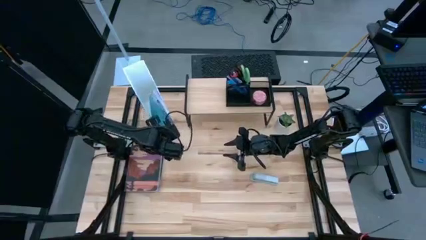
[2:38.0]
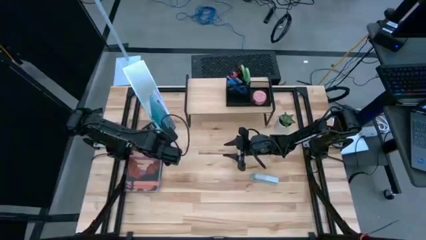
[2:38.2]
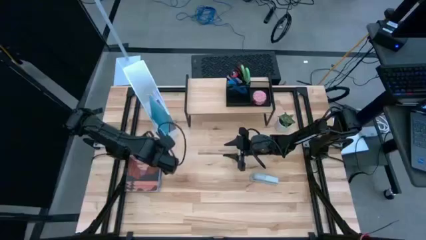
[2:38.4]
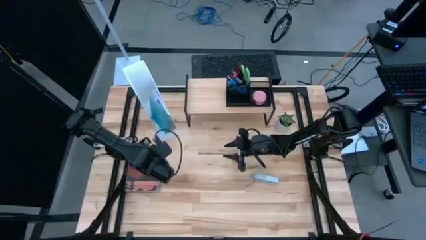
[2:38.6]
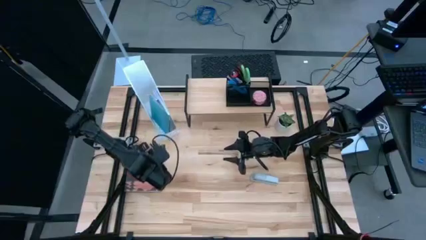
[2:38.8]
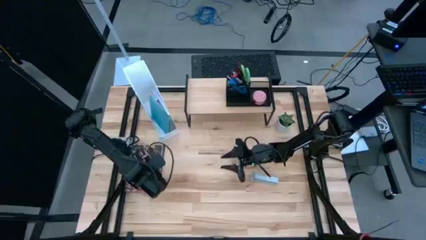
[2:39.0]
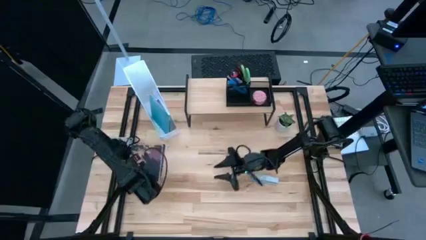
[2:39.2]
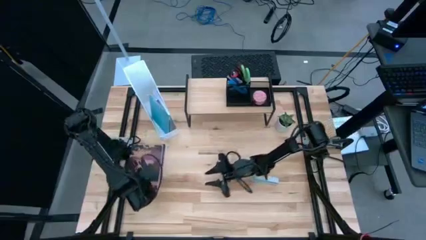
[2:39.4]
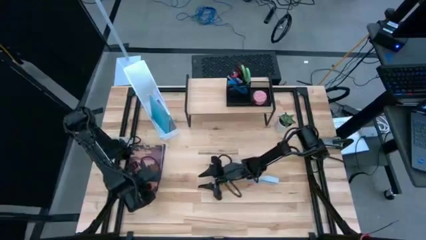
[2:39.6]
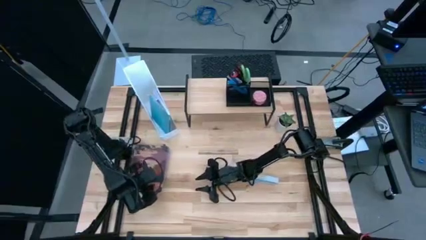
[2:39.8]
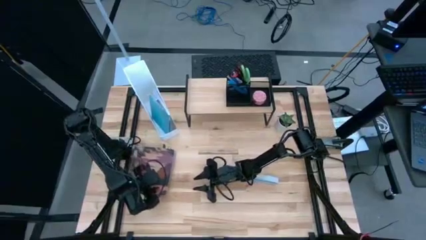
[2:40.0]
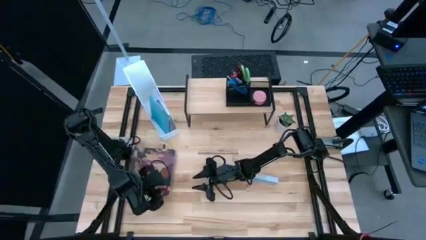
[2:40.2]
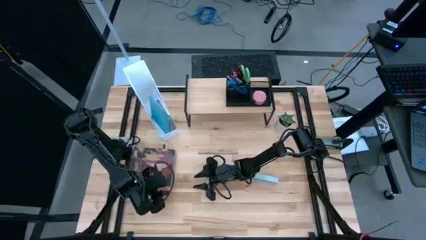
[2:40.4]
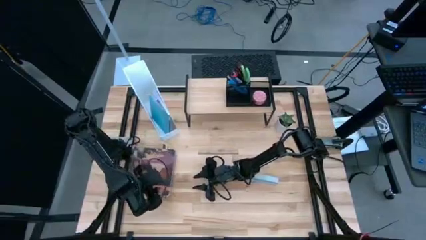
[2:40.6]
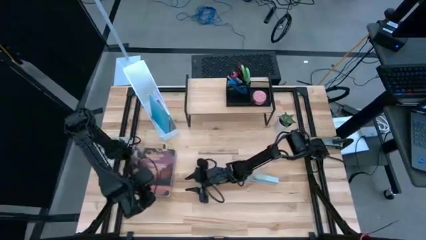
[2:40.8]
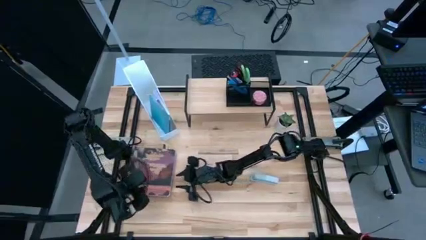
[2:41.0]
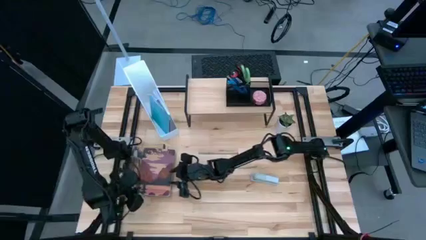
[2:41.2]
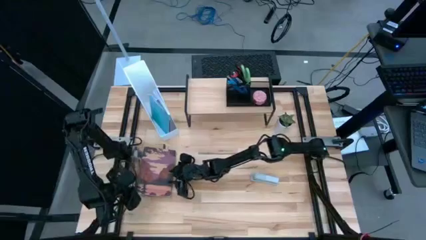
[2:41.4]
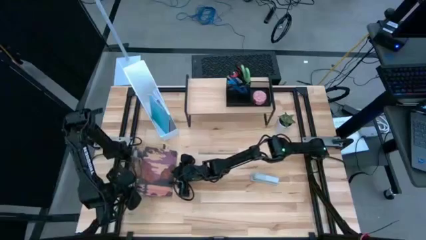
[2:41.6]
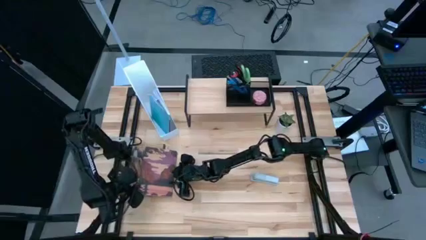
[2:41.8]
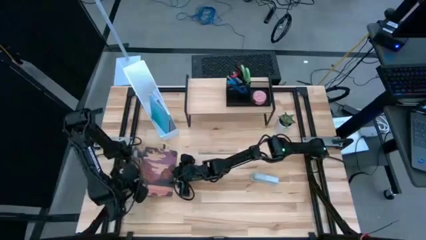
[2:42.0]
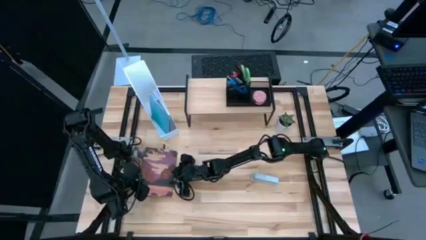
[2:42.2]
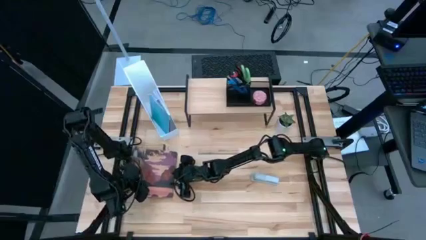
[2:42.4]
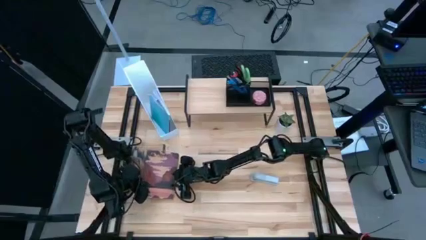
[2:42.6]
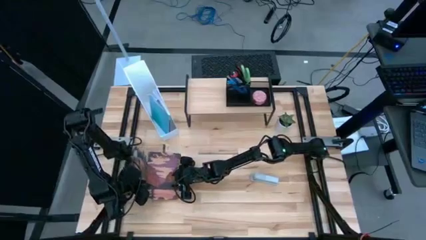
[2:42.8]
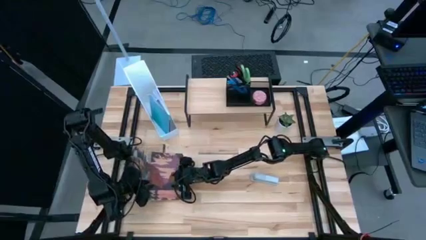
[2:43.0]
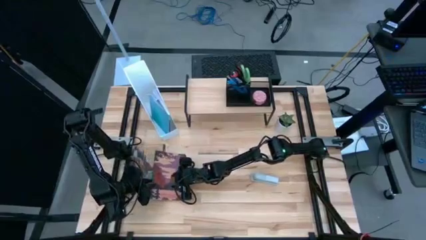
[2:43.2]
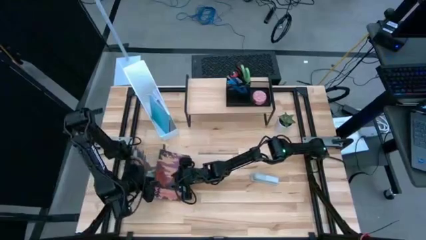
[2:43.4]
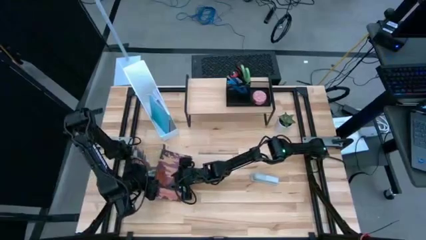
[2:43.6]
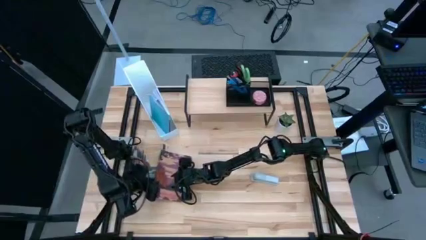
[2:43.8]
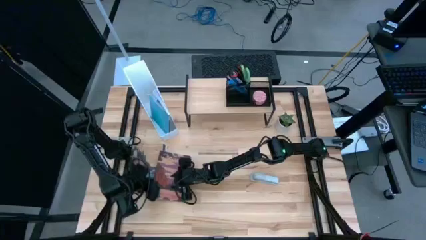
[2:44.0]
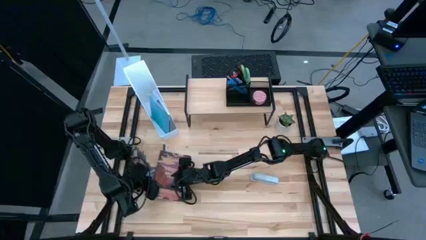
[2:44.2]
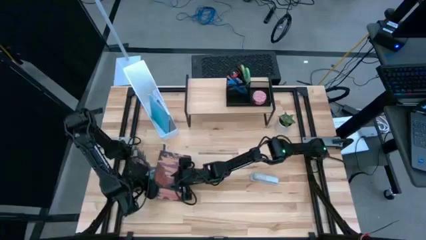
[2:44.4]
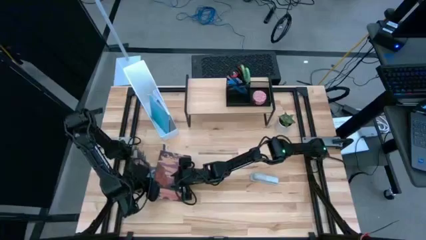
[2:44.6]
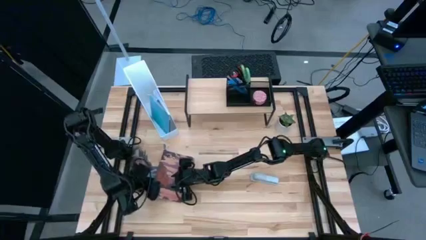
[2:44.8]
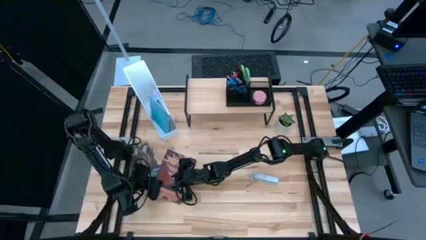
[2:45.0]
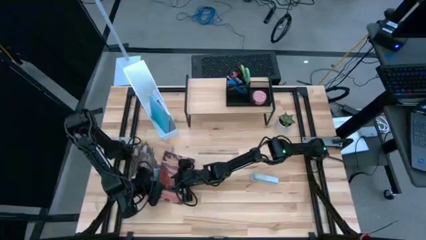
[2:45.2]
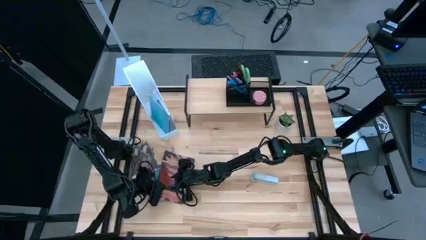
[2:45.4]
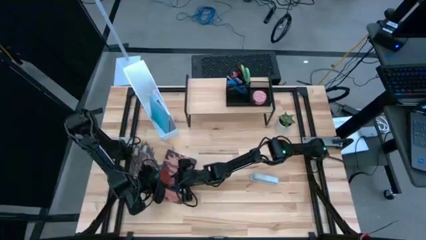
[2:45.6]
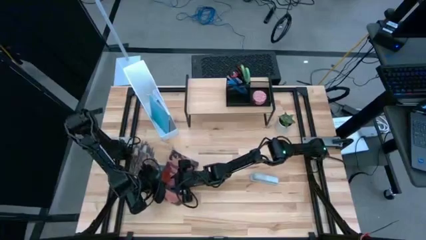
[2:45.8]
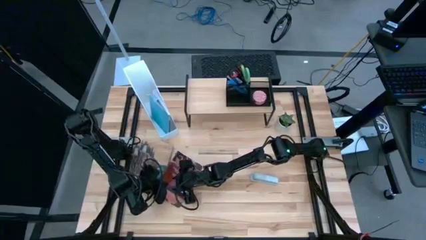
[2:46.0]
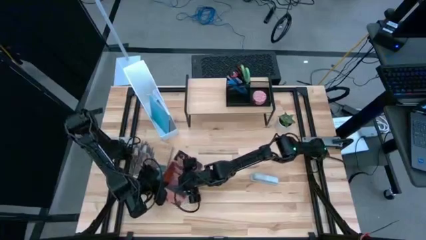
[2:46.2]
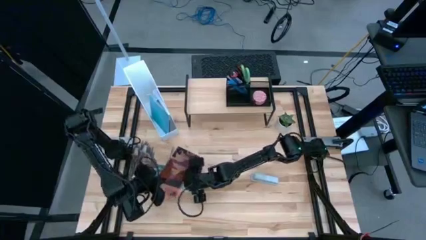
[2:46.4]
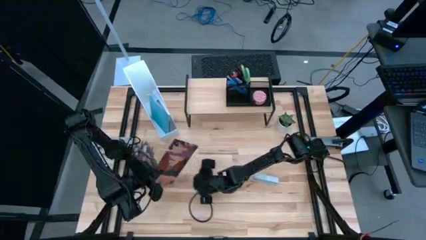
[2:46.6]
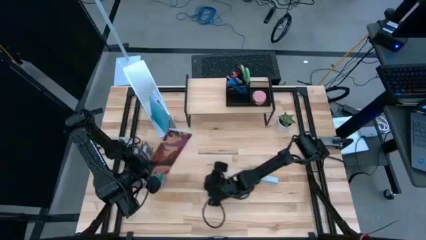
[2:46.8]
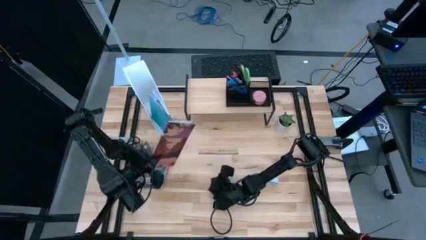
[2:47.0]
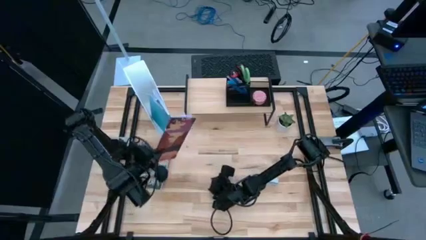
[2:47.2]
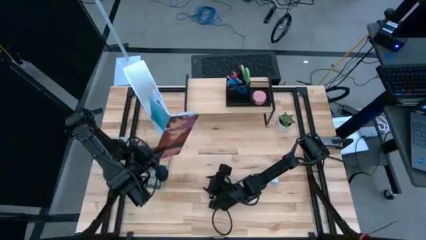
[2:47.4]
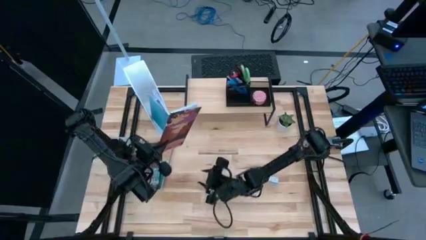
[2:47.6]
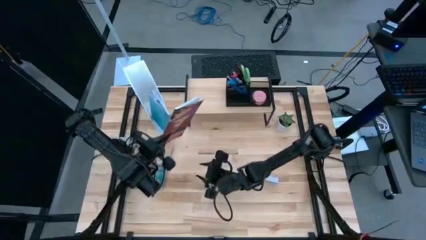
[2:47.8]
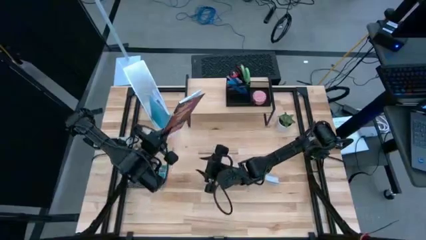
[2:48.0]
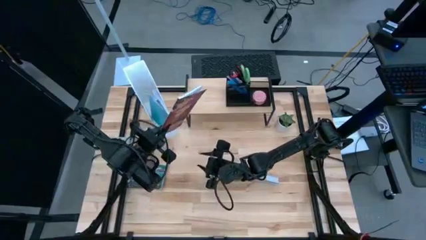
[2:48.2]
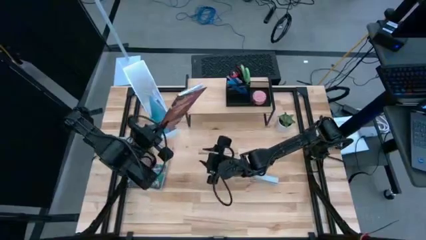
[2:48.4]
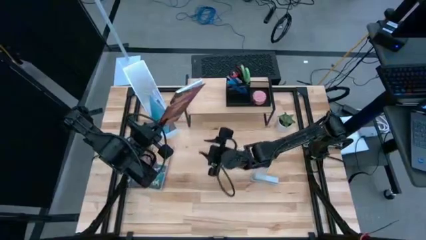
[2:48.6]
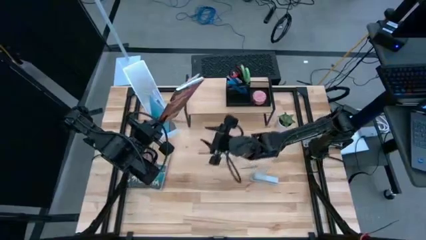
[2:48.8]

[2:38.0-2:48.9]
Task: Stock shelves
Put the purple book into the white bookshelf

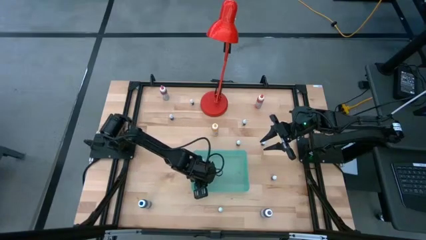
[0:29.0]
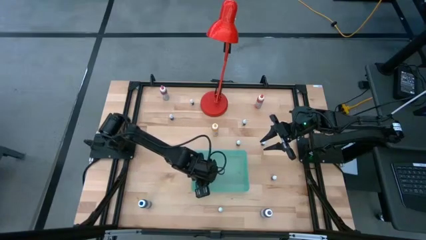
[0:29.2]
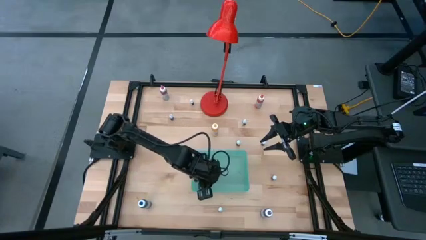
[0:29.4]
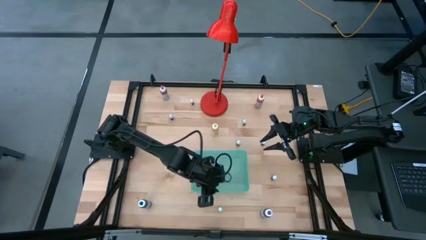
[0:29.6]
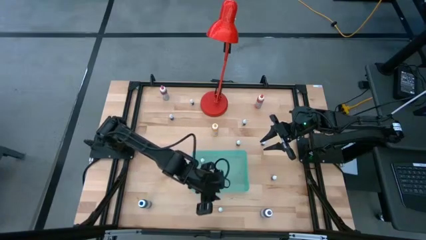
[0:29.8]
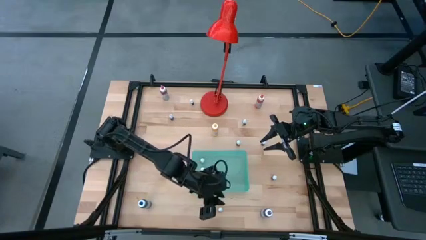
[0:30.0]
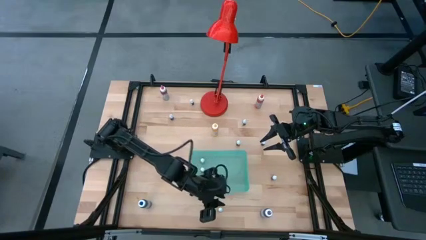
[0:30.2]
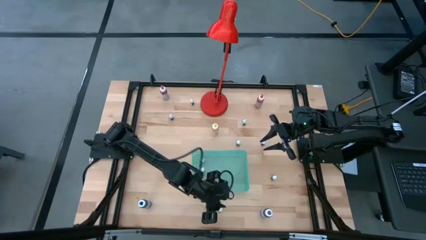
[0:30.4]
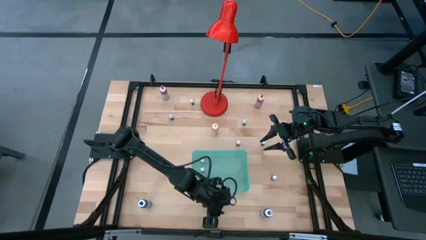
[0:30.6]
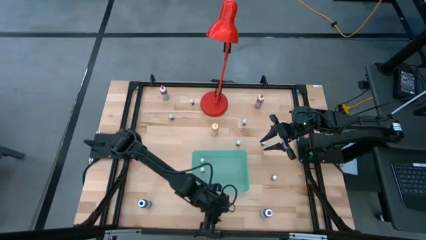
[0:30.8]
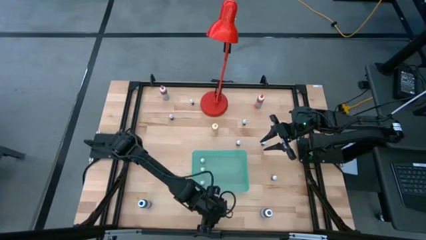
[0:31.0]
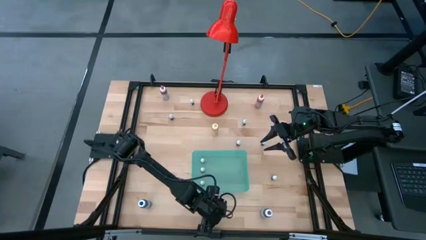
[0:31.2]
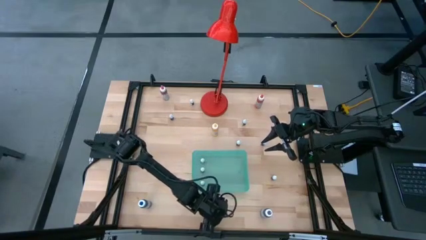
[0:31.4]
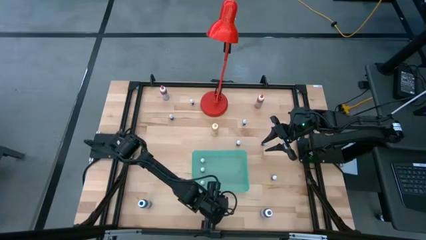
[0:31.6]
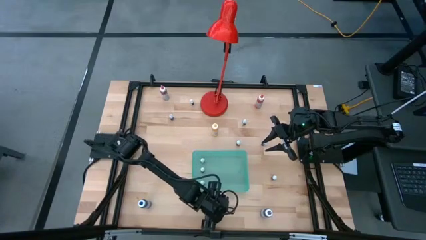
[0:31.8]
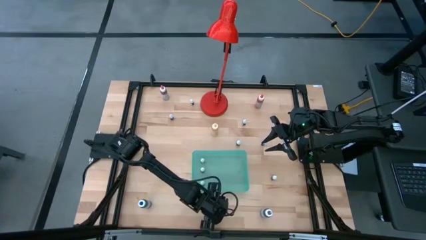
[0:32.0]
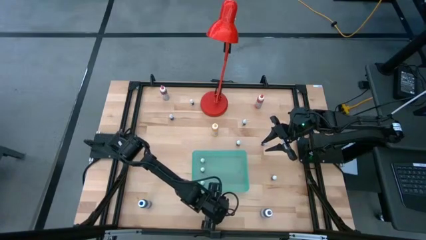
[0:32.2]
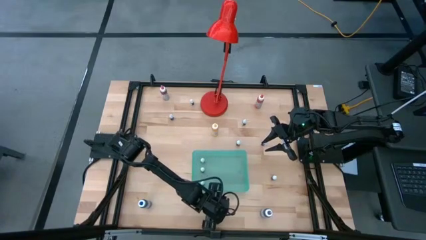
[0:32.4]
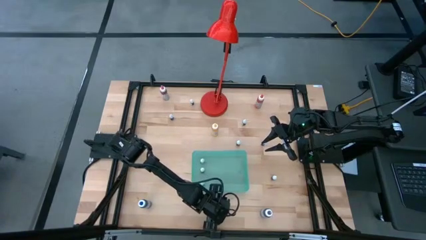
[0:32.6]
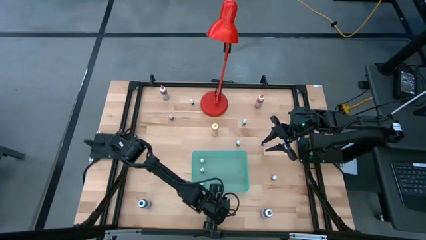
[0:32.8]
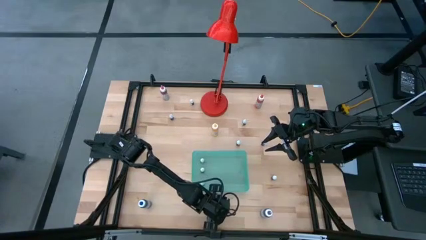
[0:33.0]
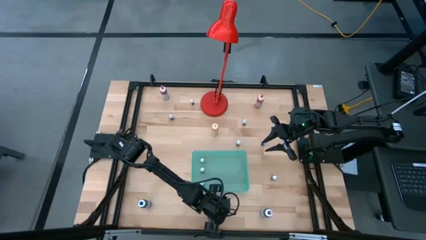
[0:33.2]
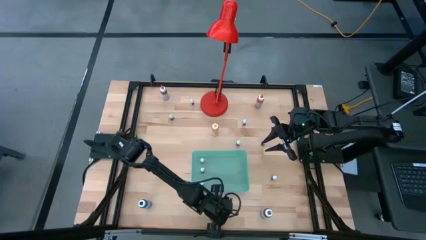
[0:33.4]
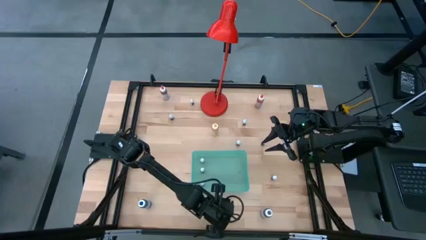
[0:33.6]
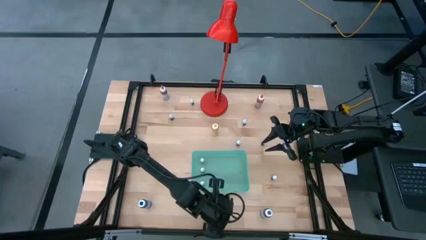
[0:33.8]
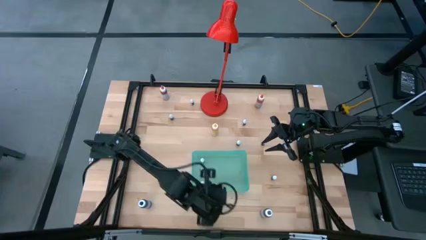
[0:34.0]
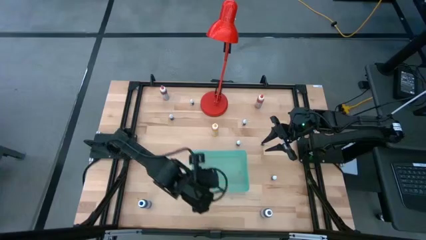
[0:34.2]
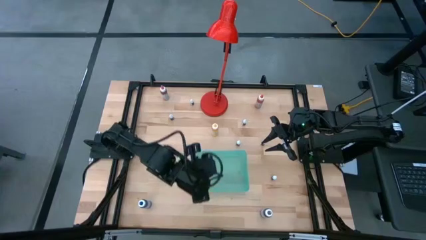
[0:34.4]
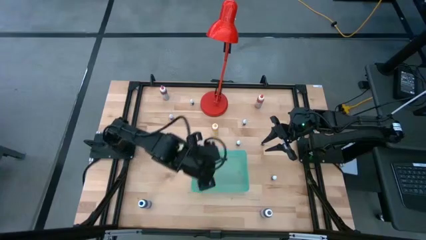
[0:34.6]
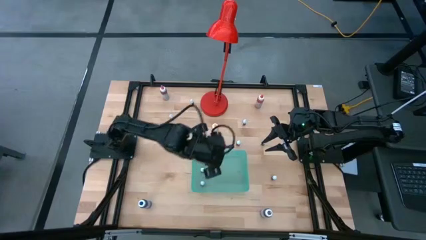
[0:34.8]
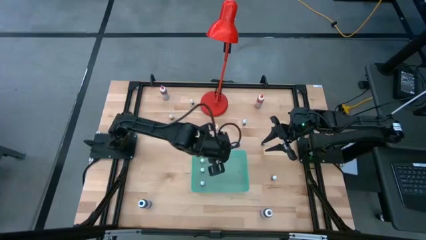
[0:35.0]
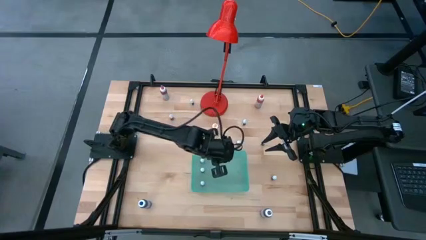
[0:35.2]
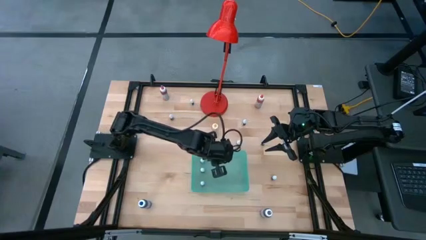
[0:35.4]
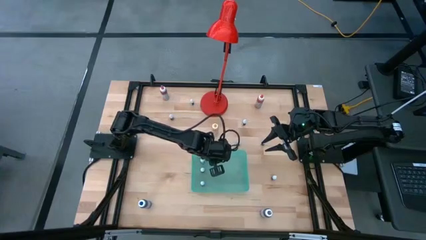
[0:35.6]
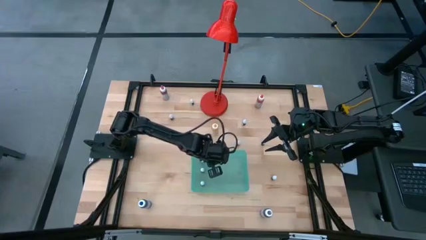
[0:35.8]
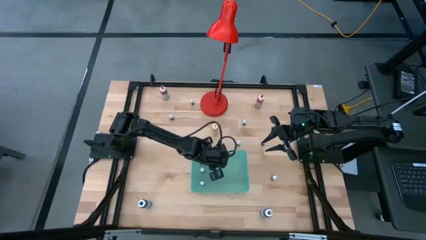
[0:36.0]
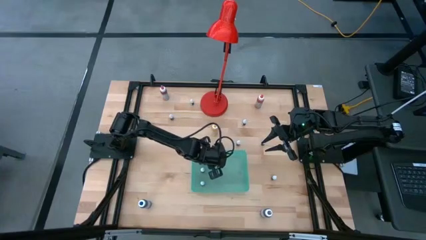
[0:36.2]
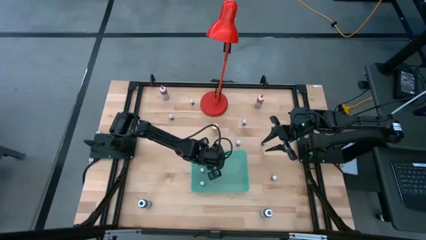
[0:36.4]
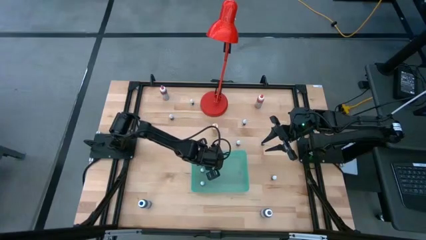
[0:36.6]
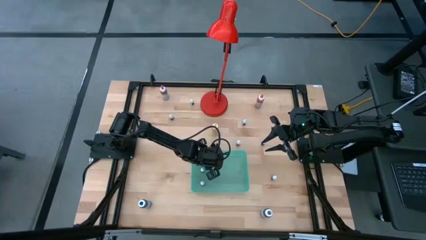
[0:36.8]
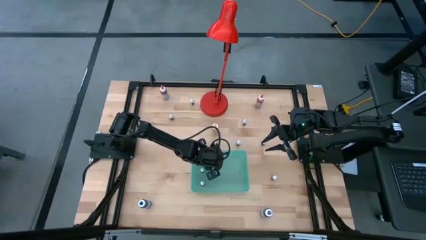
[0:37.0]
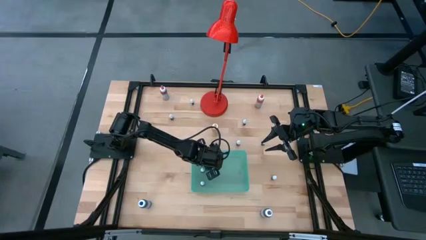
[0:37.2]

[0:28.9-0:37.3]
Task: Pick & Place food coloring
Put the small black food coloring bottle into the blue bin
